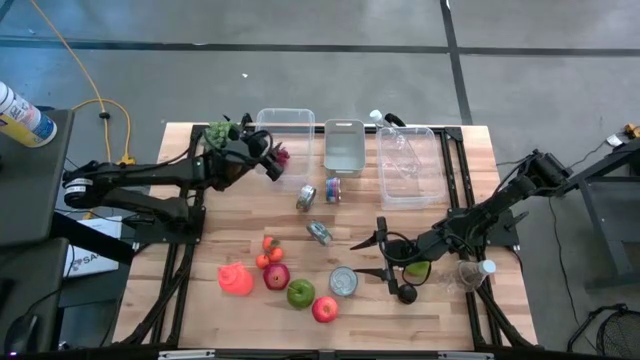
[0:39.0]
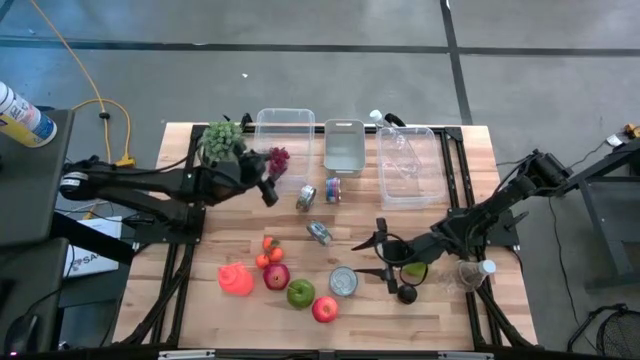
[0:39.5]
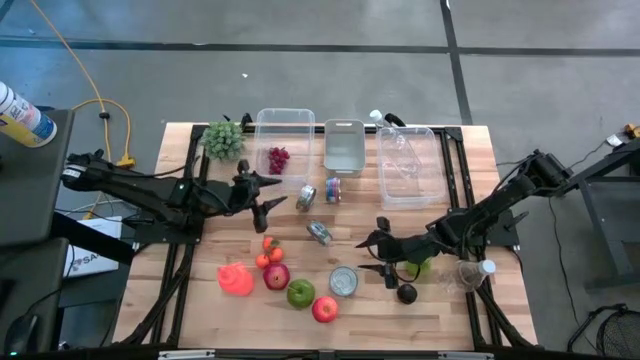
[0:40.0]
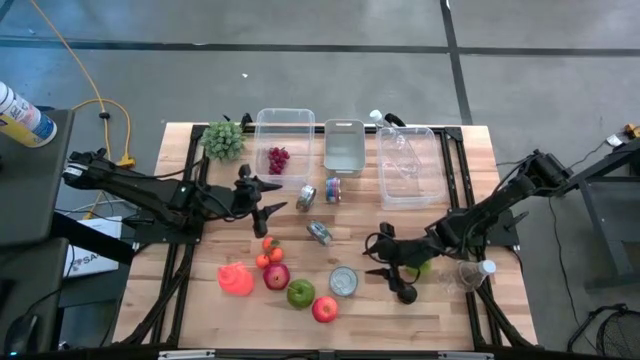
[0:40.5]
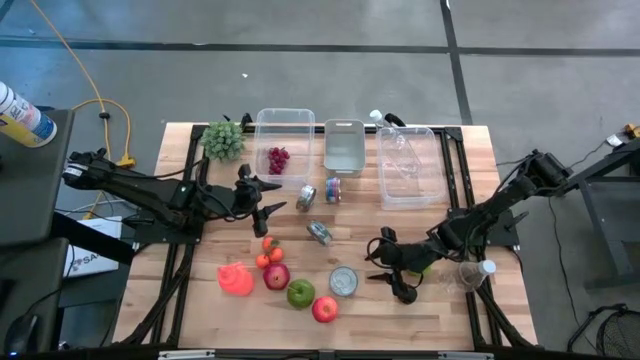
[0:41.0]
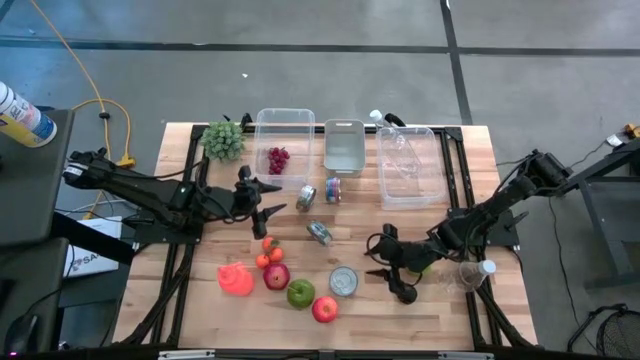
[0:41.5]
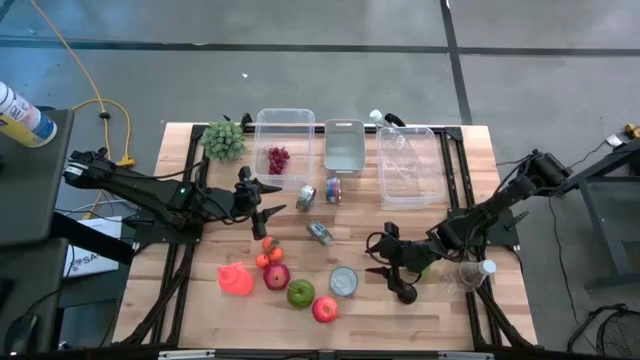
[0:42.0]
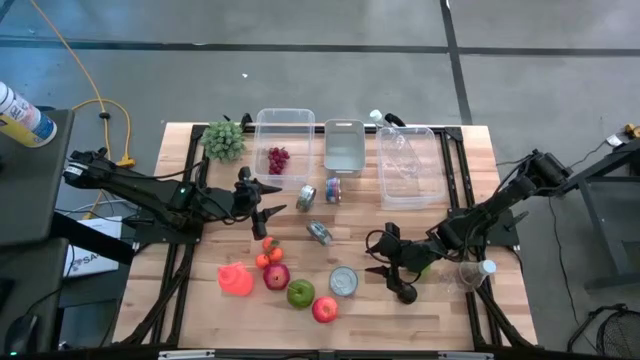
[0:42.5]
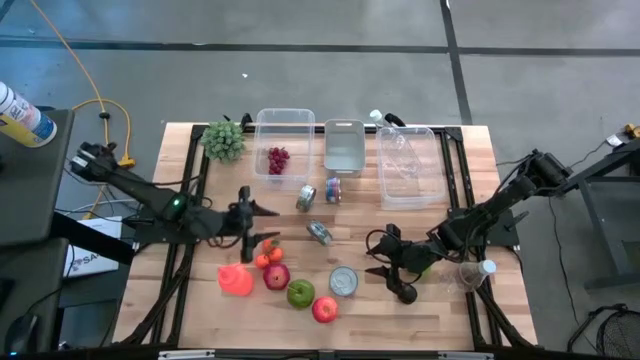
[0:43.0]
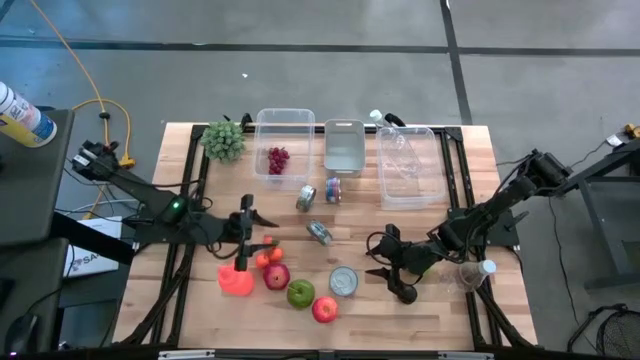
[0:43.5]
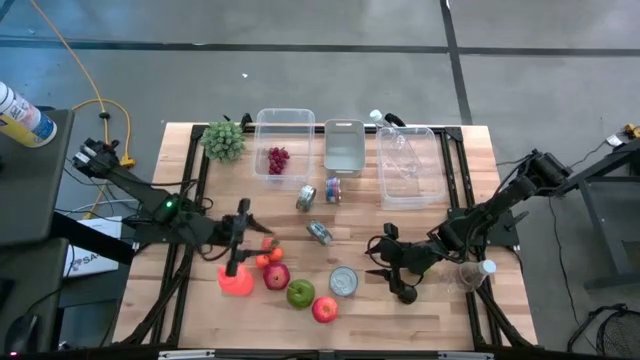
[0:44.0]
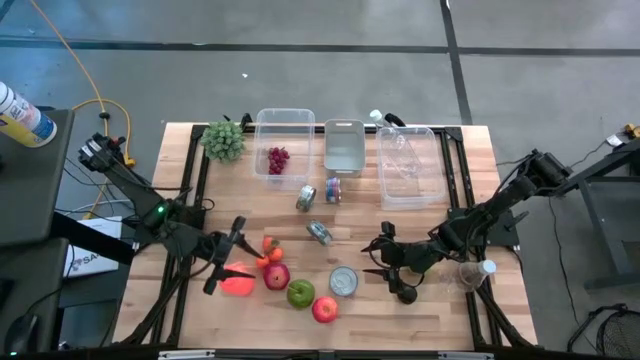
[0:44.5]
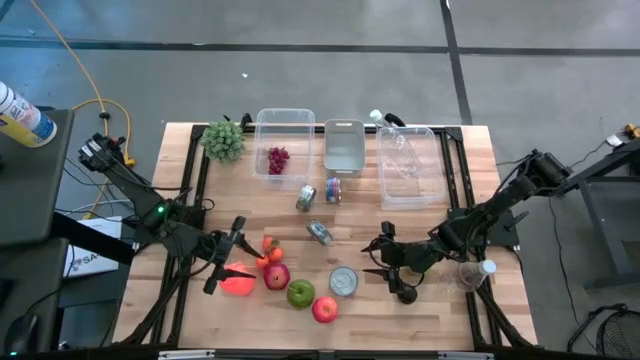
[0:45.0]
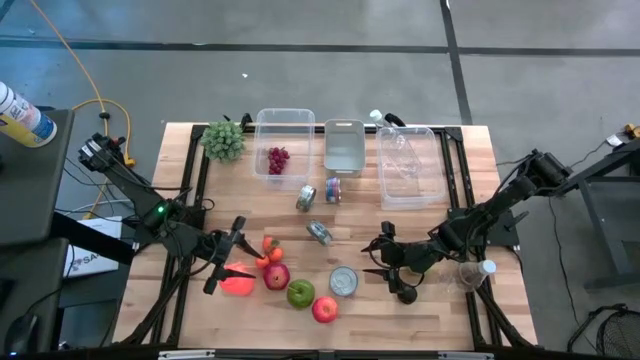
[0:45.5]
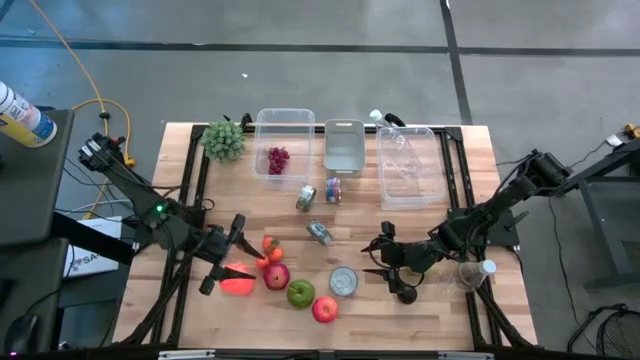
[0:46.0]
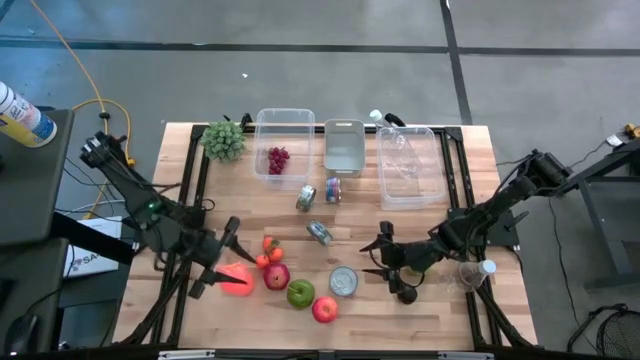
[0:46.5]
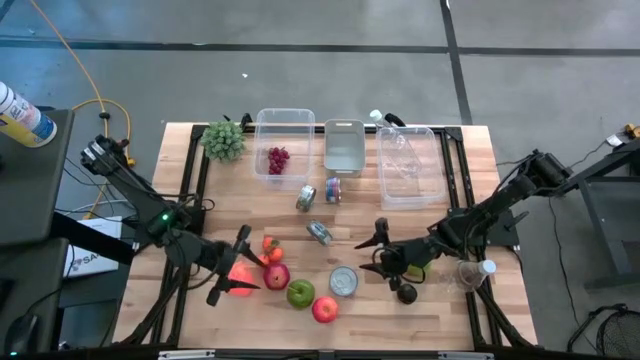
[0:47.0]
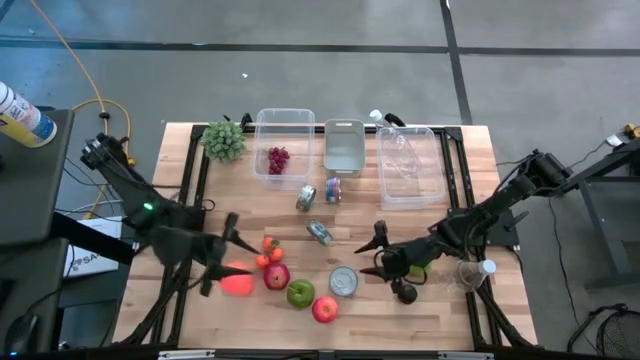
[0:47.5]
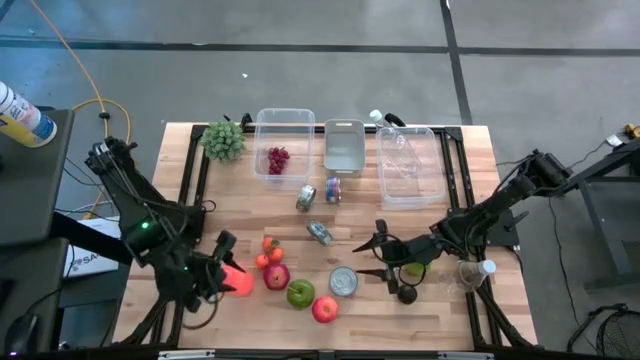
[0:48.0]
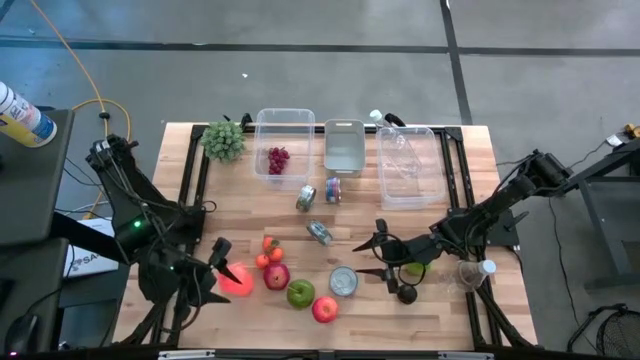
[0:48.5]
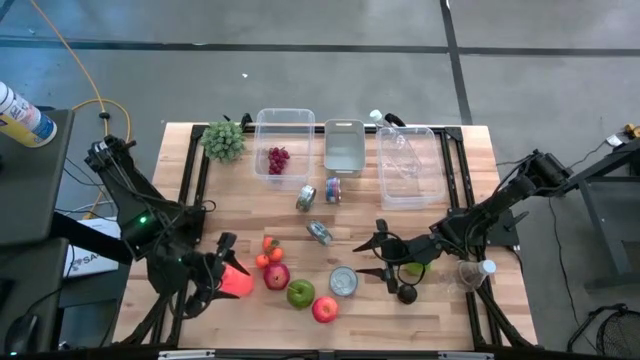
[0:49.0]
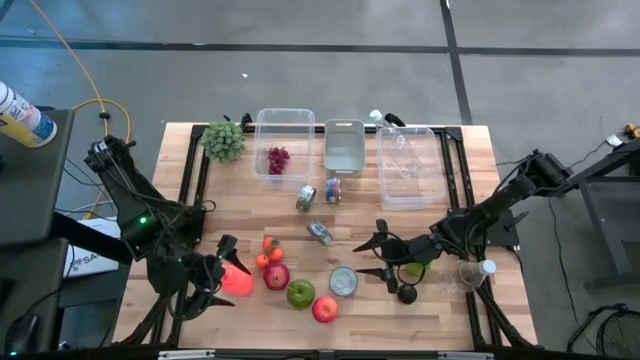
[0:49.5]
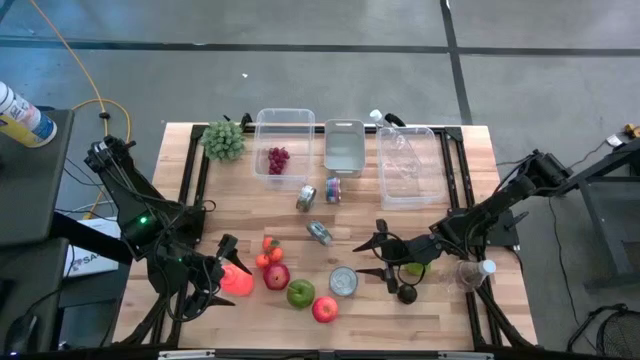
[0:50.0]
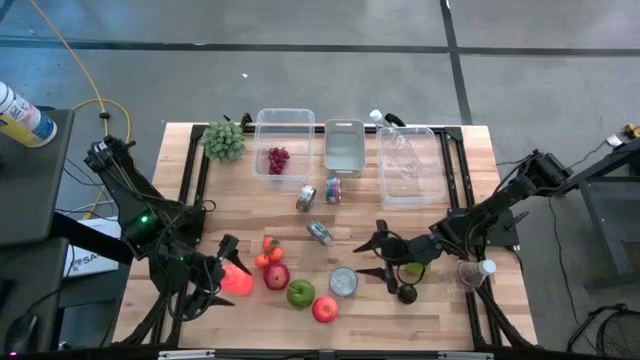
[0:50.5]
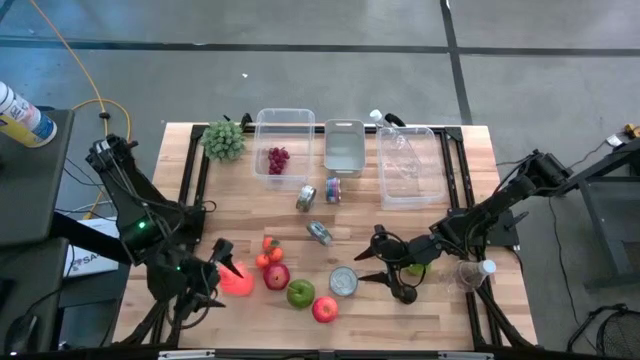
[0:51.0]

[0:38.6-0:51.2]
Task: Pick & Place Food Item
Put the orange water bottle into the right transparent bin
